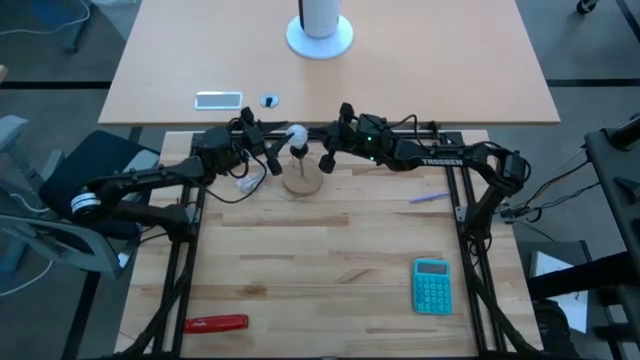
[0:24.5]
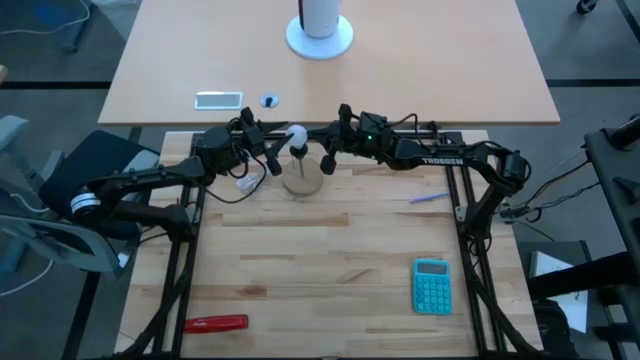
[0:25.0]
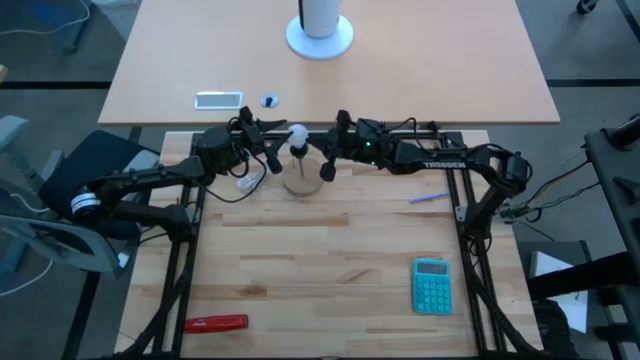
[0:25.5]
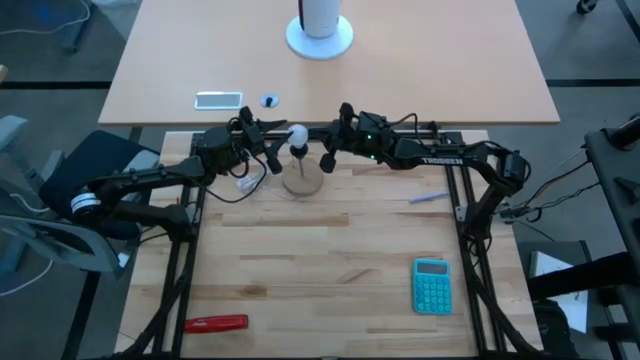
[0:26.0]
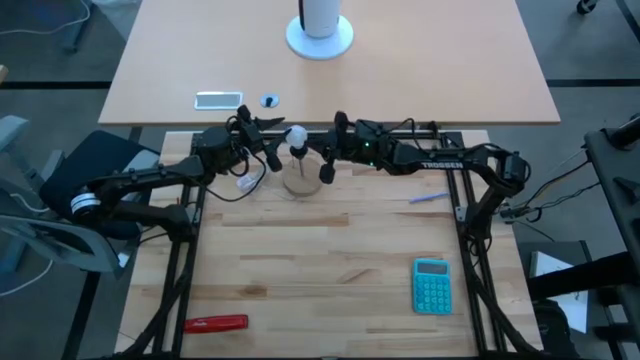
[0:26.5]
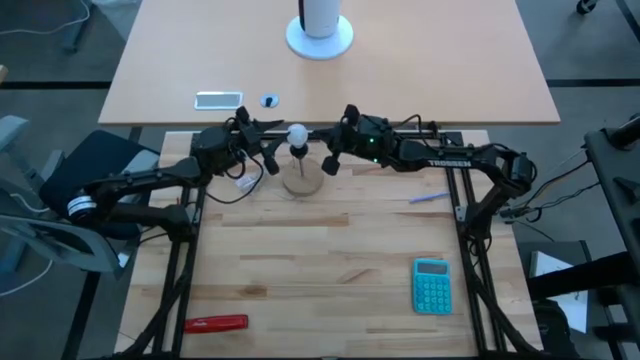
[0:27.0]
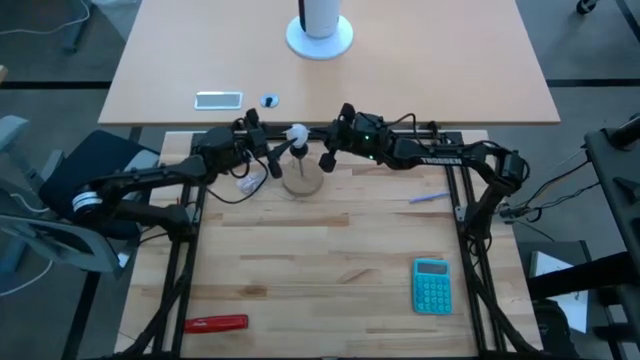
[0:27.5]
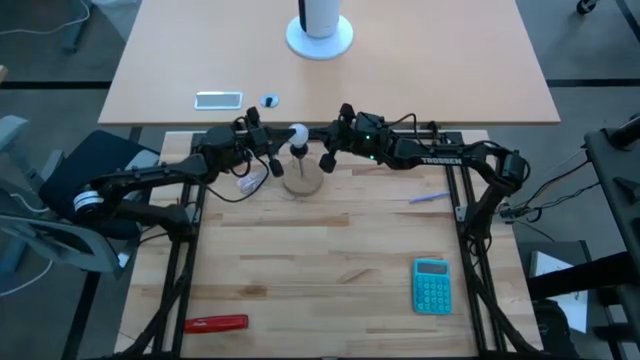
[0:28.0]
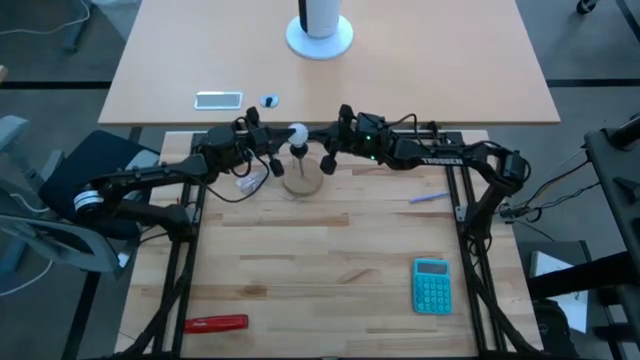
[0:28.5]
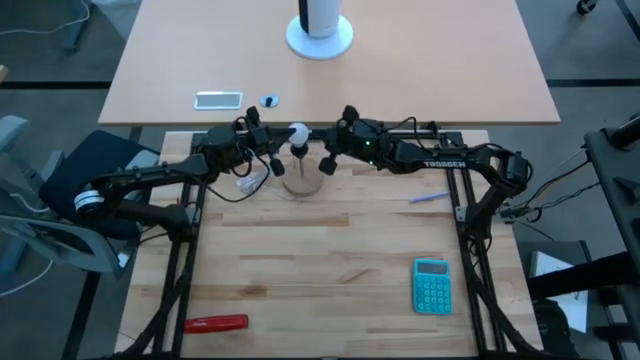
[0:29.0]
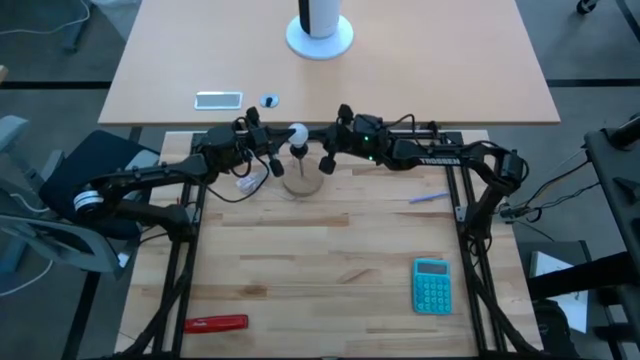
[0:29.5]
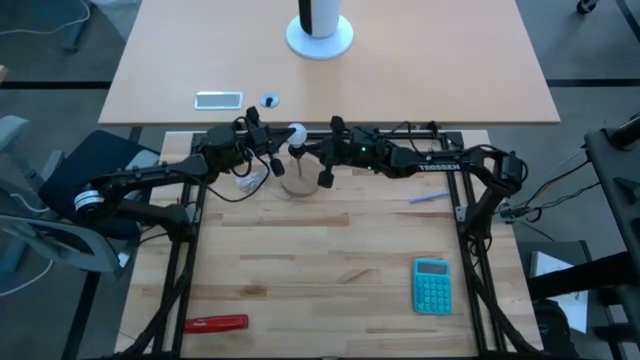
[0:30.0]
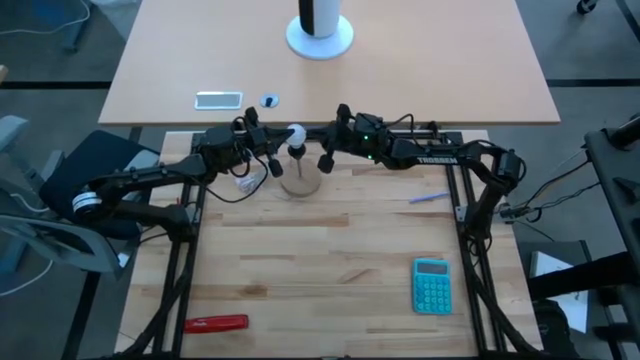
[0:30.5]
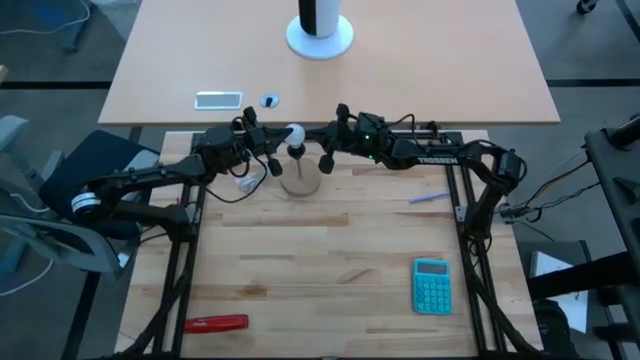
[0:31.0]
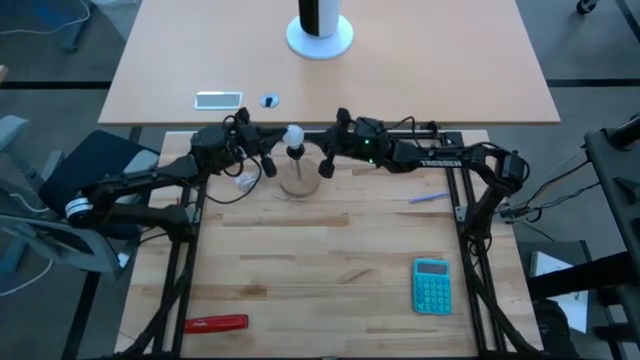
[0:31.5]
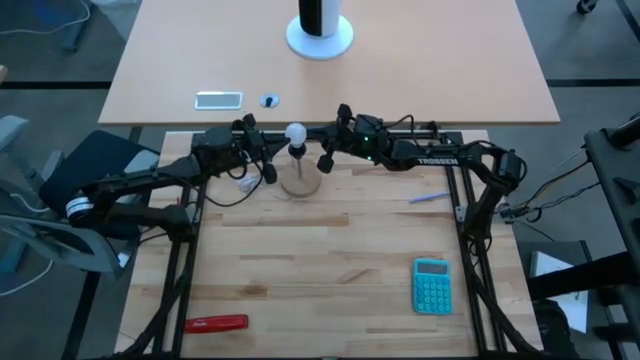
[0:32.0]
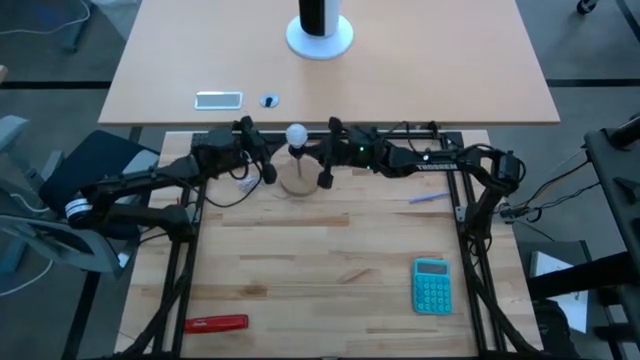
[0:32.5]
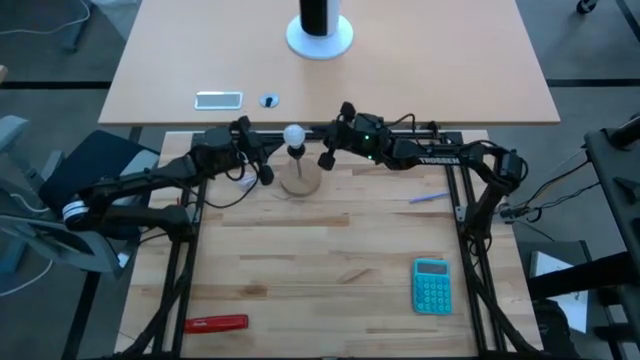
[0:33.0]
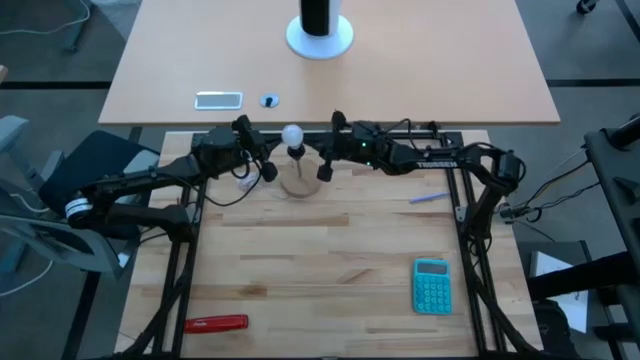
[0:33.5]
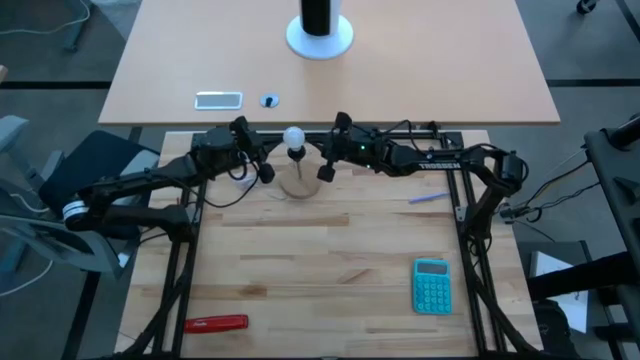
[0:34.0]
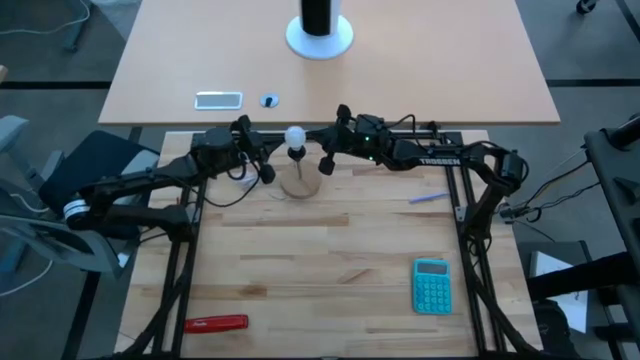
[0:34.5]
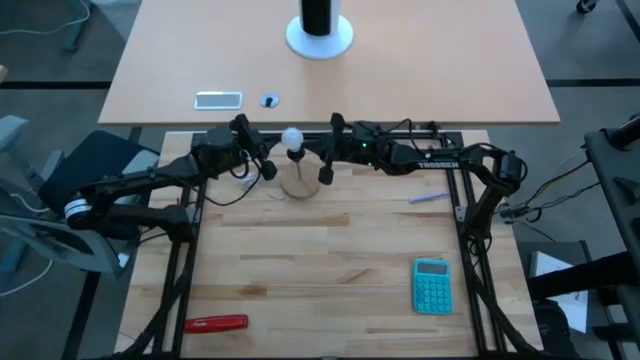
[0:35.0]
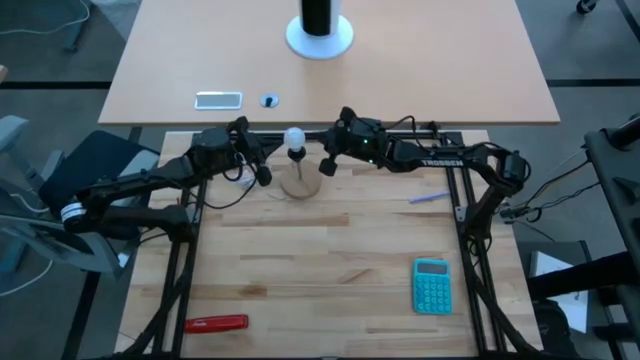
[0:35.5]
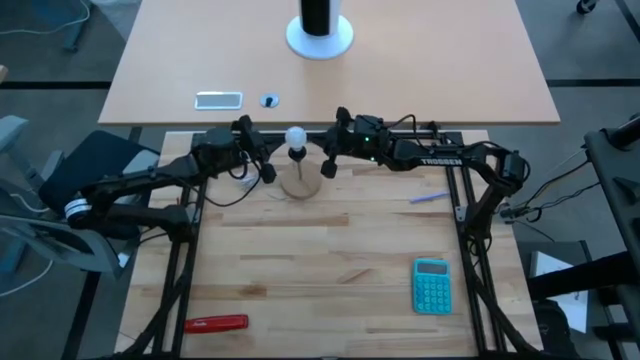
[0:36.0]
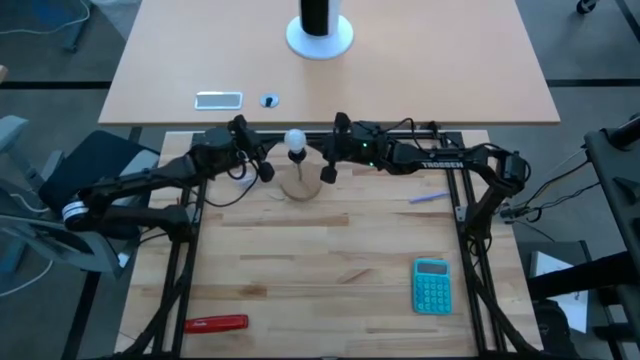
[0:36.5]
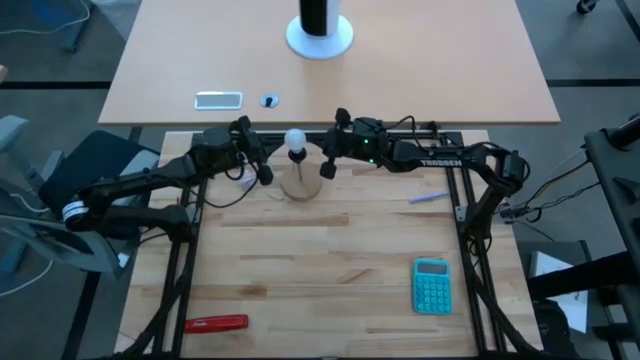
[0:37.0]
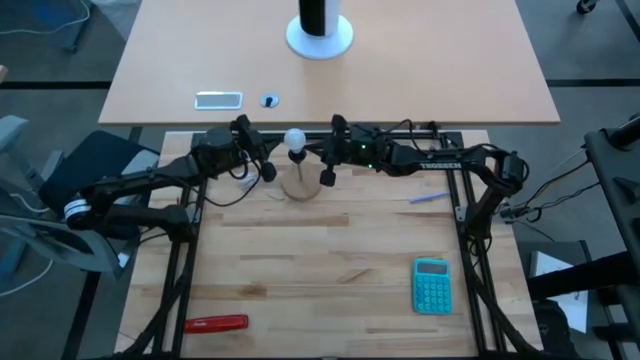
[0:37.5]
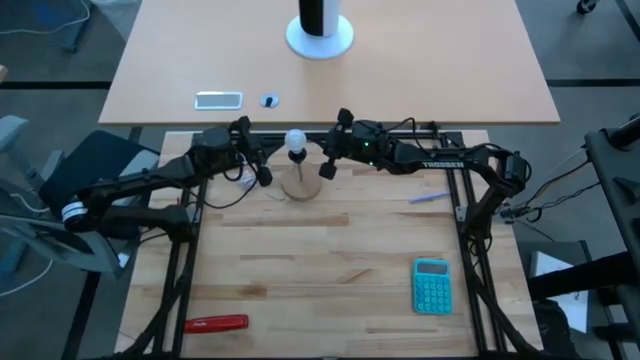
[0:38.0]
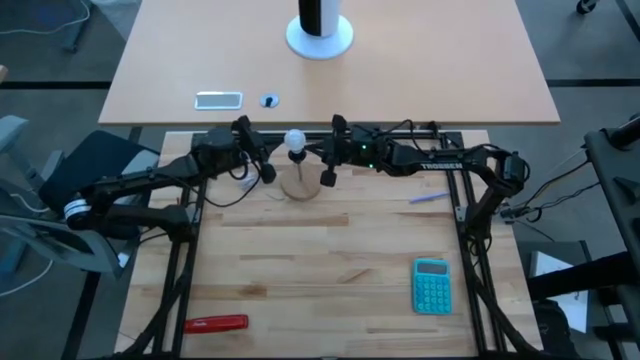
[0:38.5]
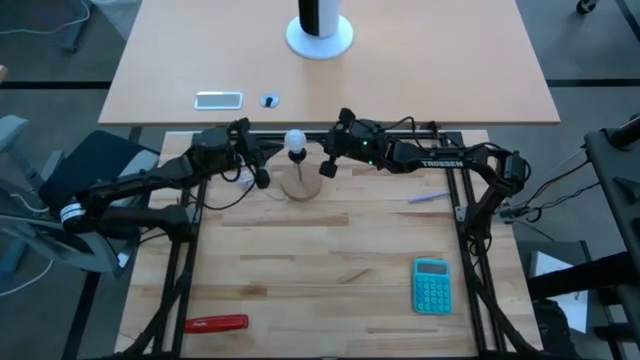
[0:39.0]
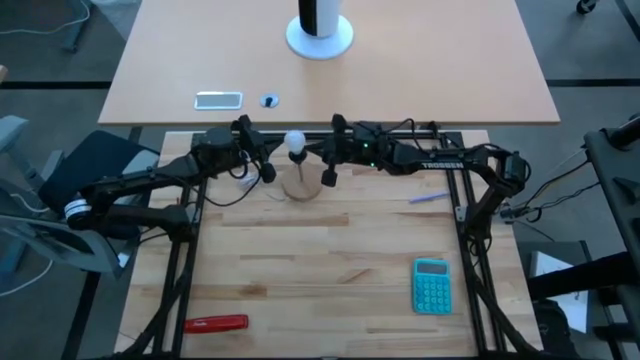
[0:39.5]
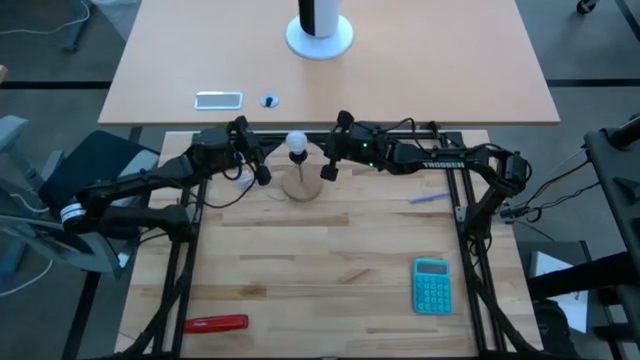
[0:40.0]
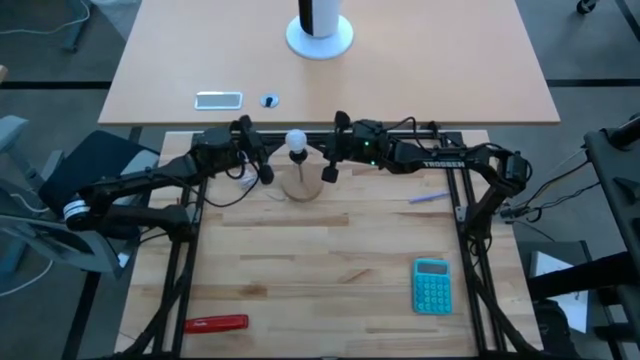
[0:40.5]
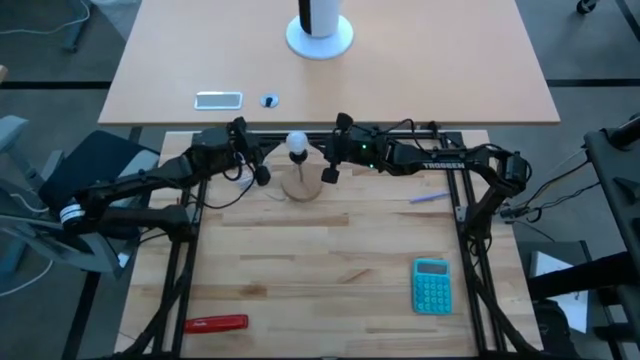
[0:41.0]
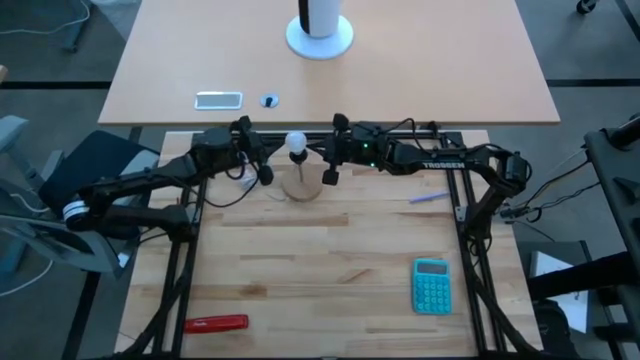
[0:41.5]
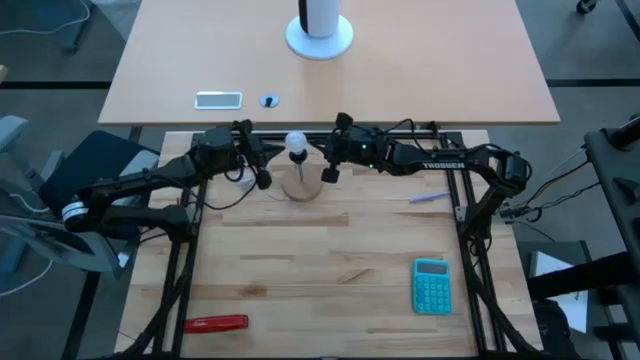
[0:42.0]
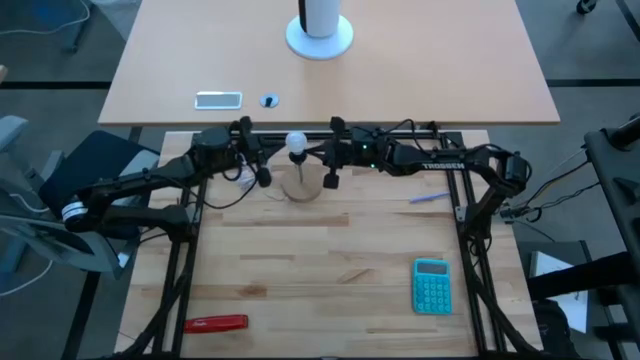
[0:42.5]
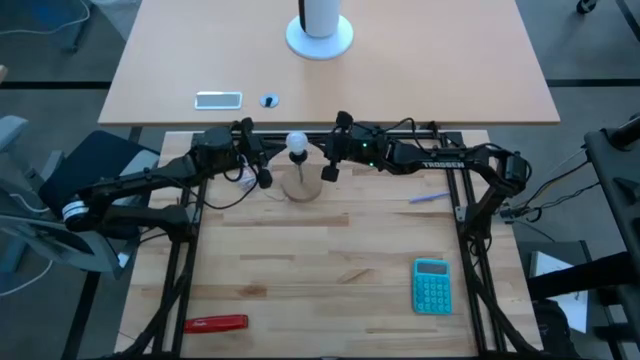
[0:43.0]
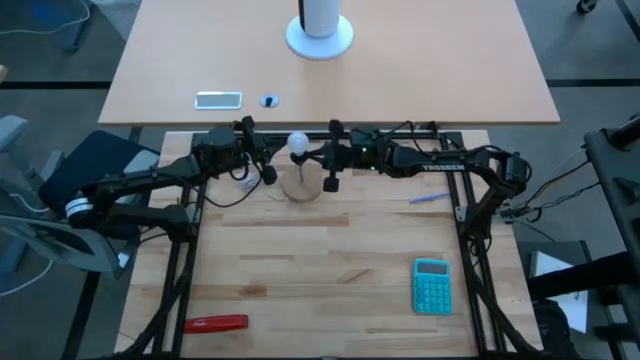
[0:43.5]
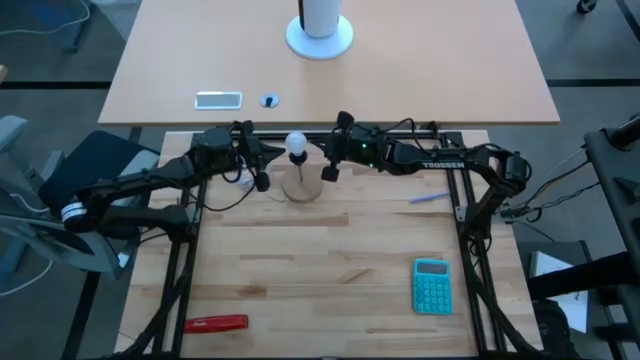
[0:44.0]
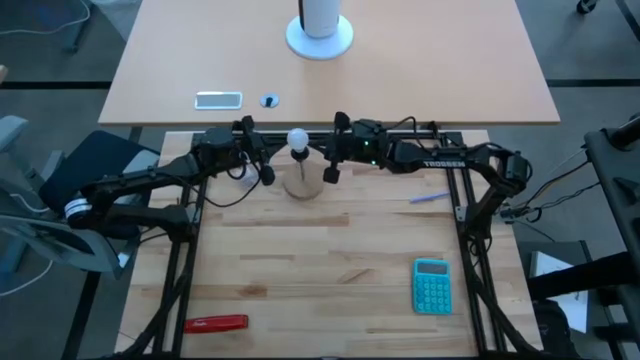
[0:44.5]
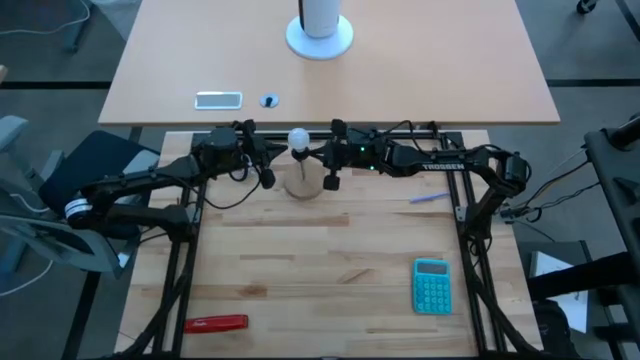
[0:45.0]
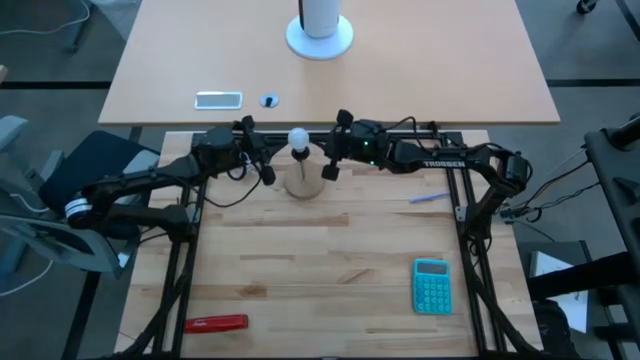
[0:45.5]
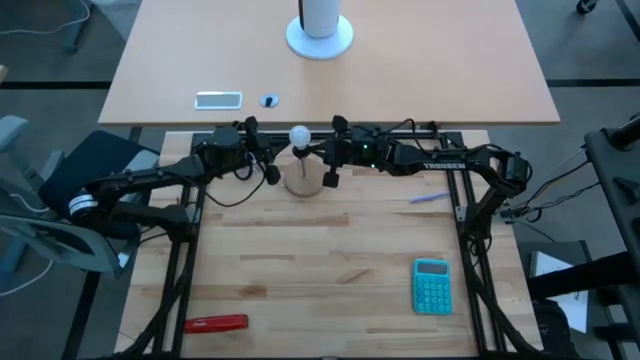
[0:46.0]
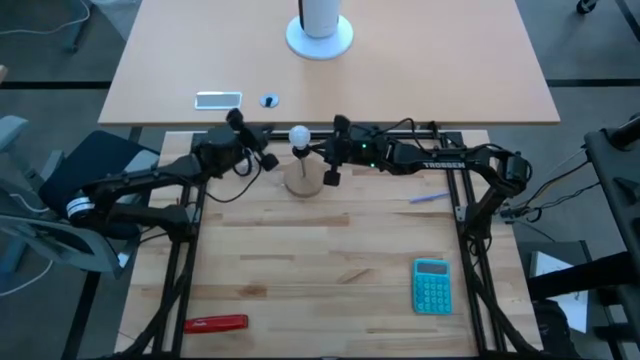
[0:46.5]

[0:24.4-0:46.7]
Task: Screw lightbulb
Insert the light bulb into the bulb socket
